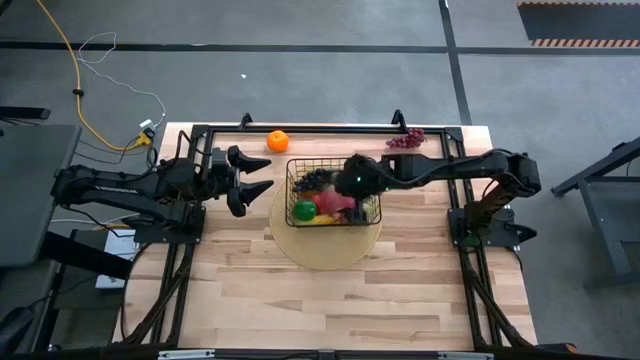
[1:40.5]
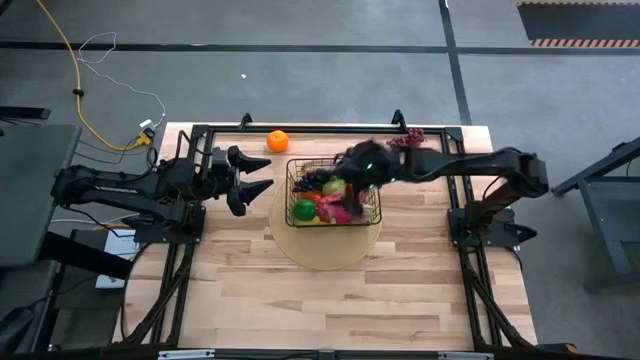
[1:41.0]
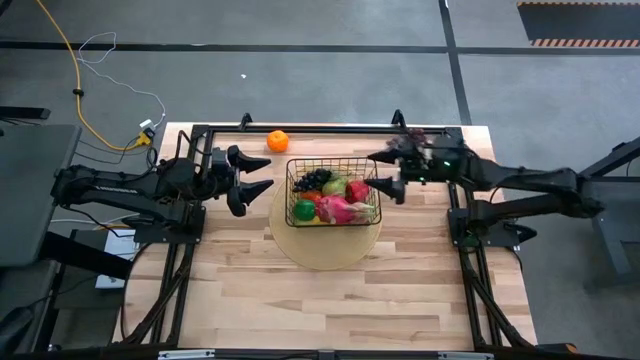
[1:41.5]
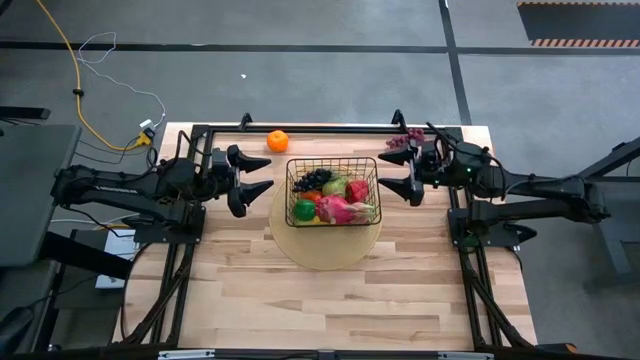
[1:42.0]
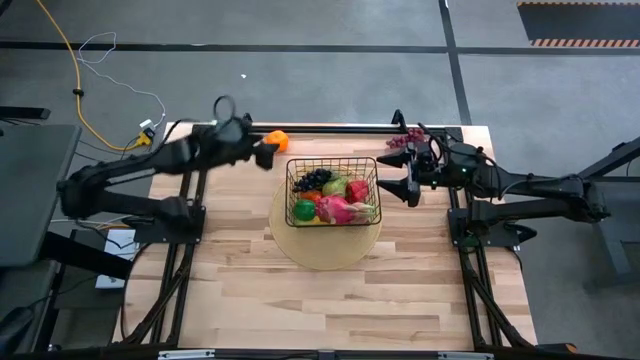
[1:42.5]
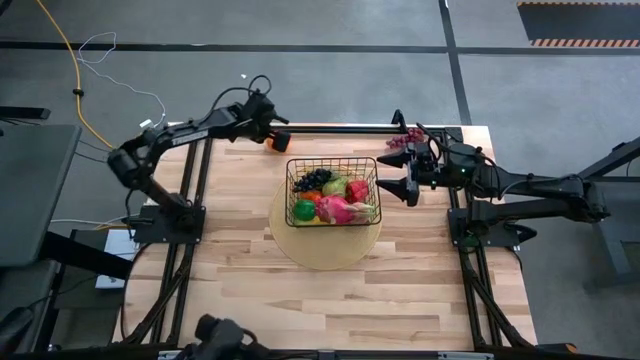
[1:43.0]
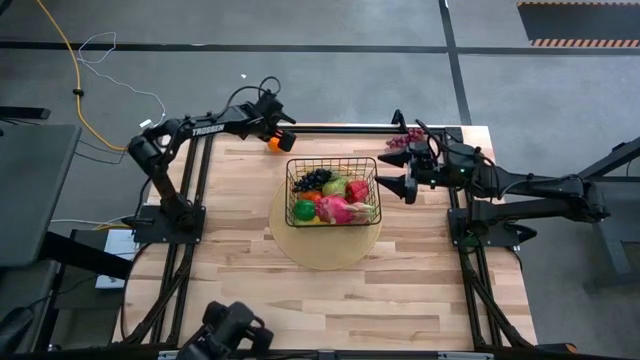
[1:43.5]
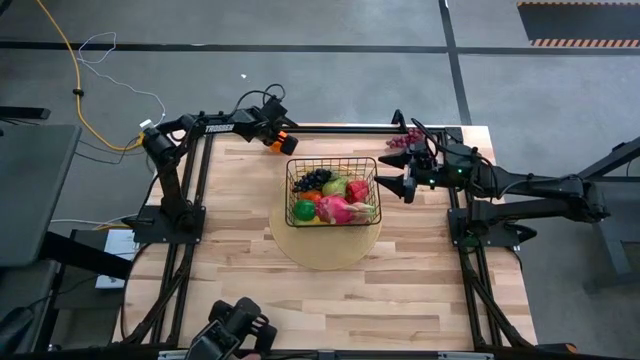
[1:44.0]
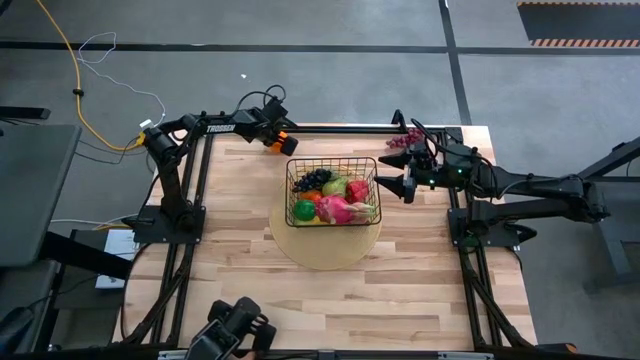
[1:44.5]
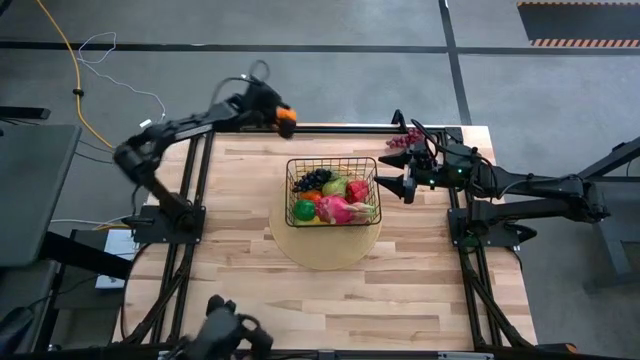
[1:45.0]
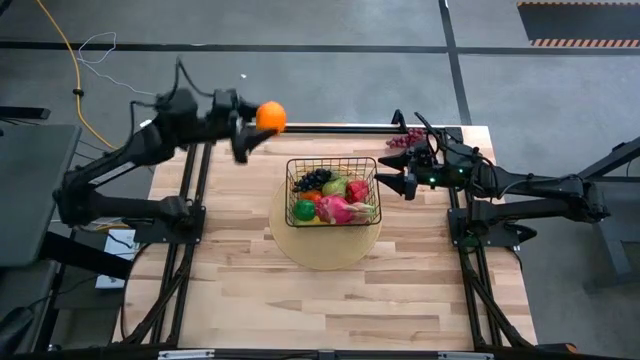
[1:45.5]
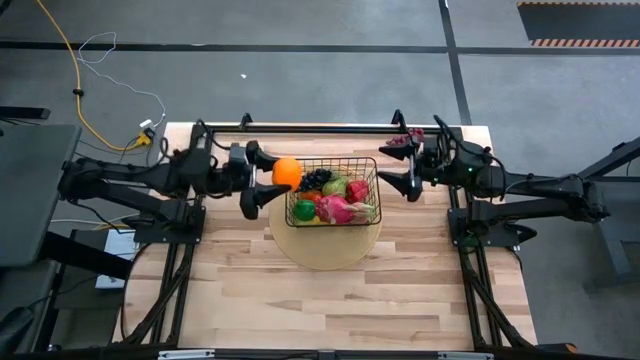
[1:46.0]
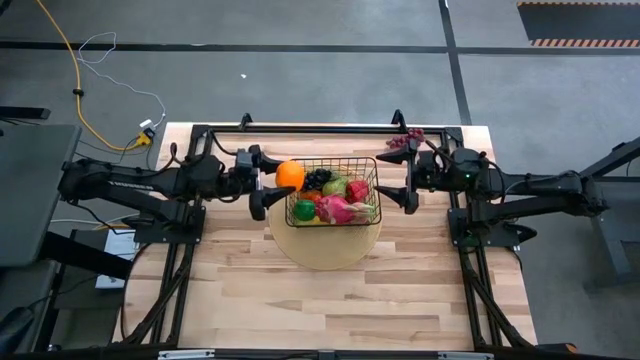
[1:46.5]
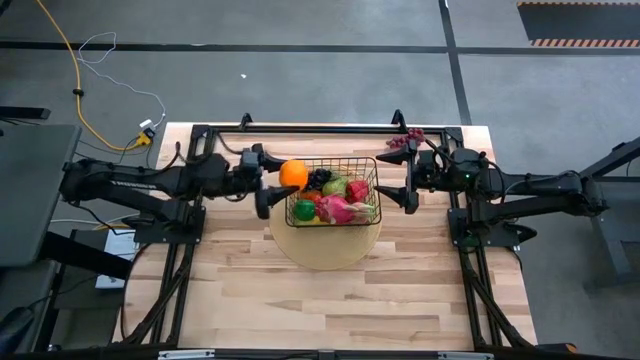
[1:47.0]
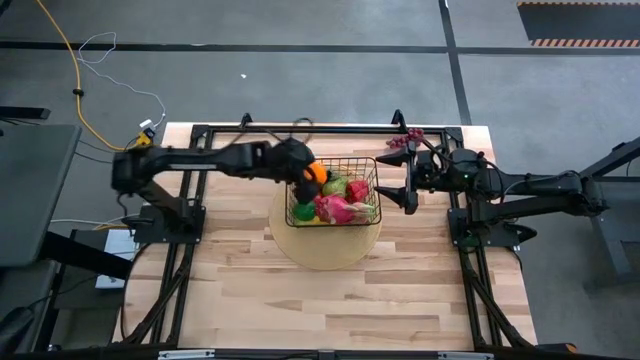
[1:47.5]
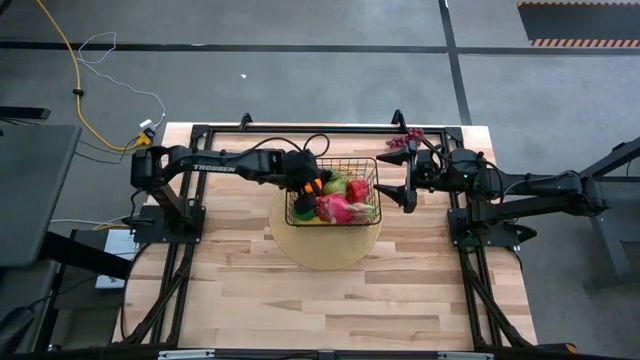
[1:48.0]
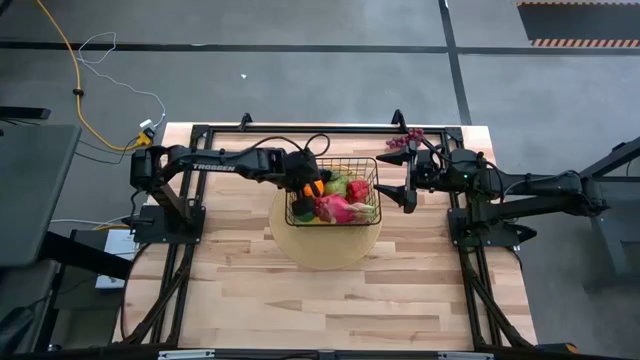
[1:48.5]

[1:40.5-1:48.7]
Task: Build produce basket
Put the orange into the black basket

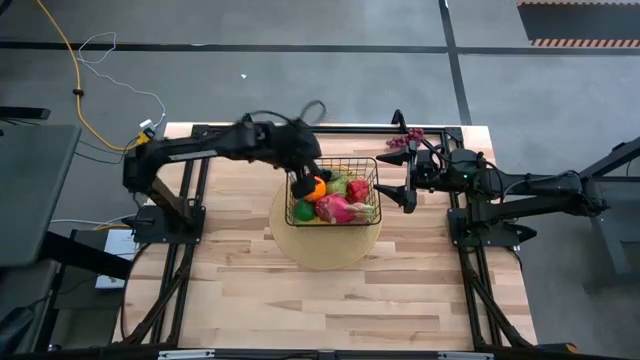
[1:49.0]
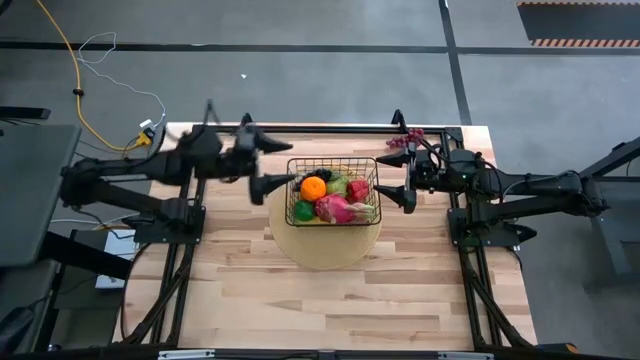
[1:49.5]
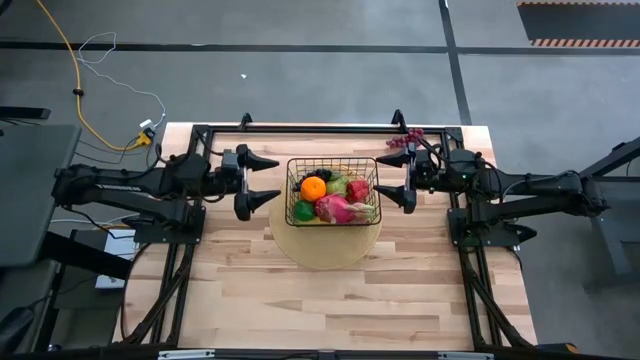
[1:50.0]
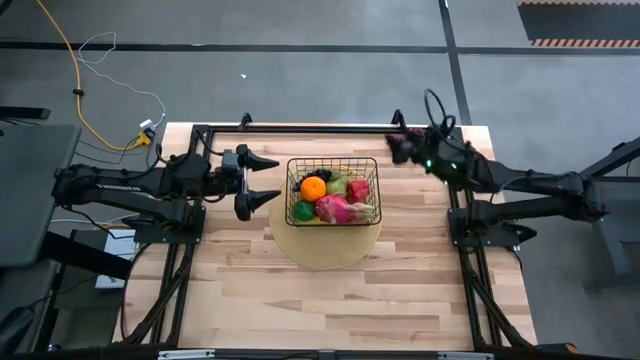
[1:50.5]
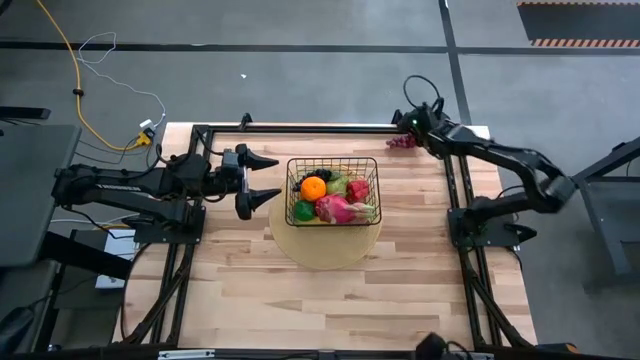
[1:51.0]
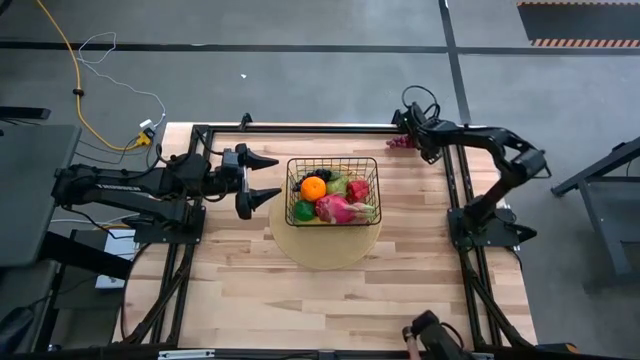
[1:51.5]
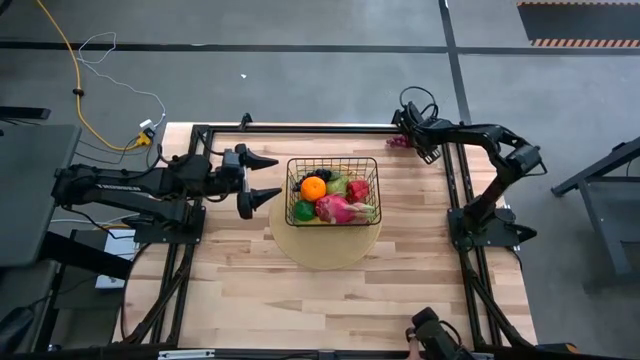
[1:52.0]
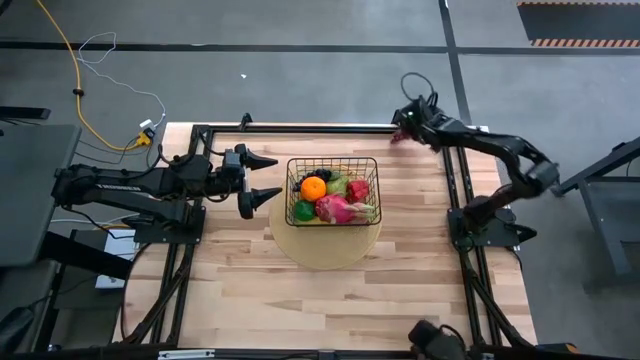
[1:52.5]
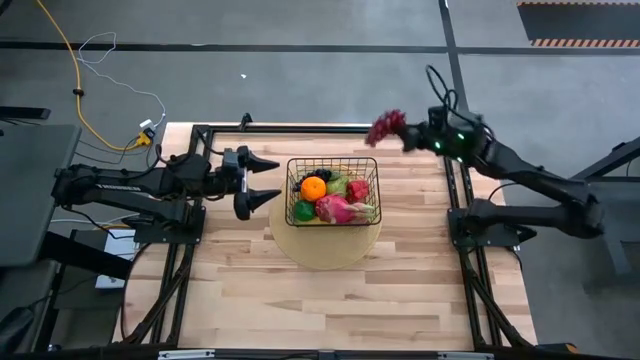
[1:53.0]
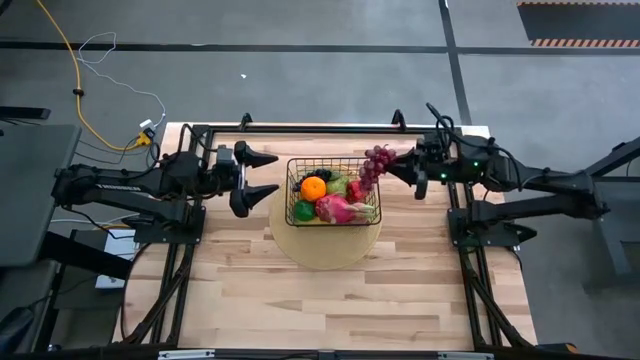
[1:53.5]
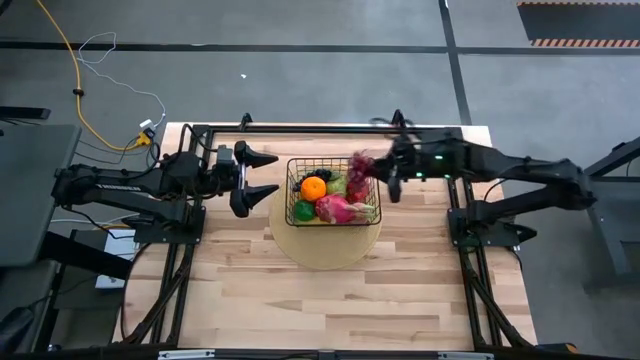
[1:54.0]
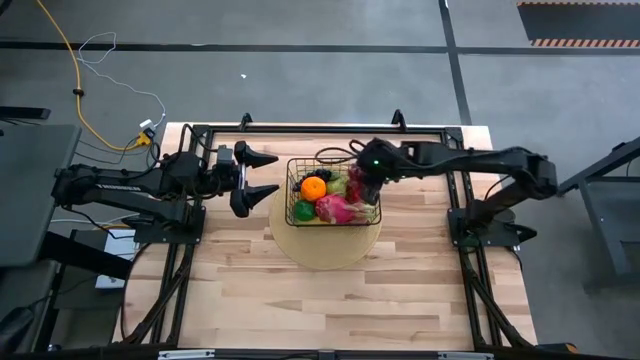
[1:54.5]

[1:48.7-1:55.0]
Put the red grapes into the wire basket

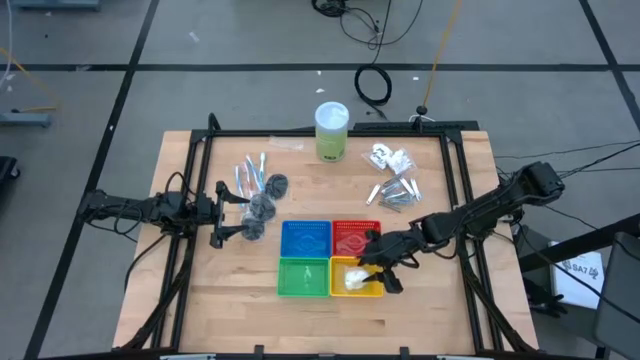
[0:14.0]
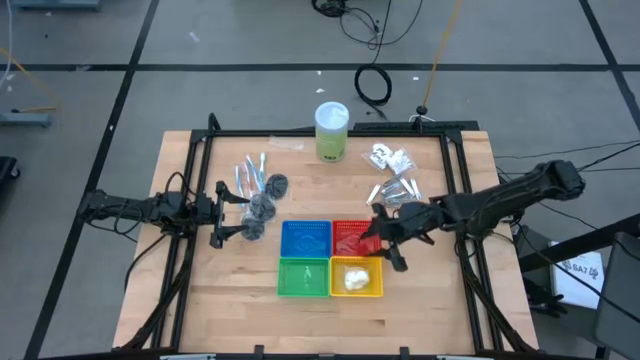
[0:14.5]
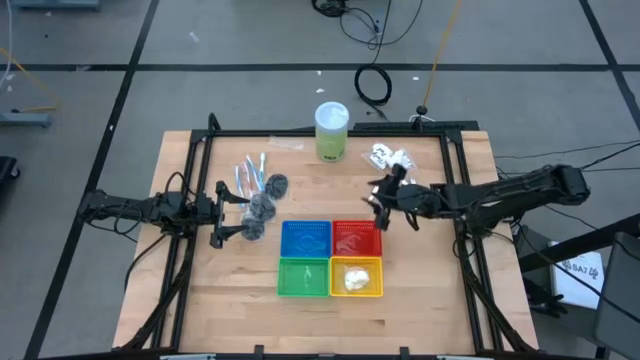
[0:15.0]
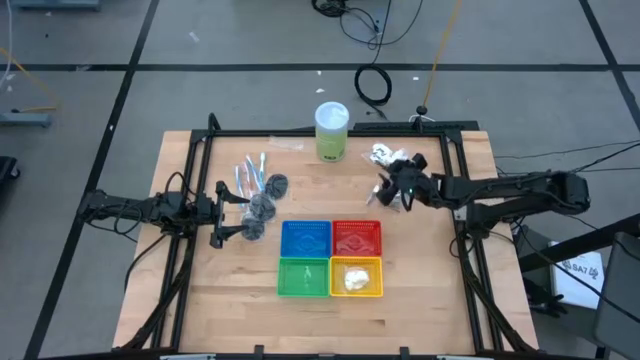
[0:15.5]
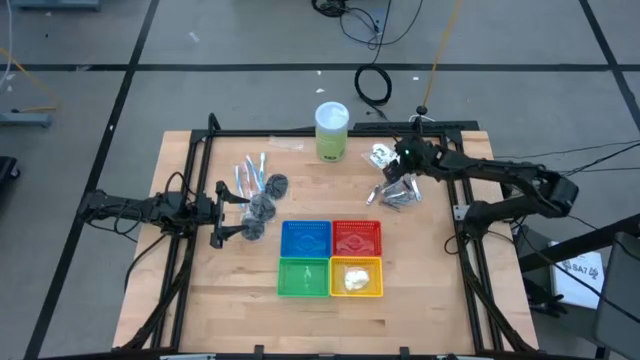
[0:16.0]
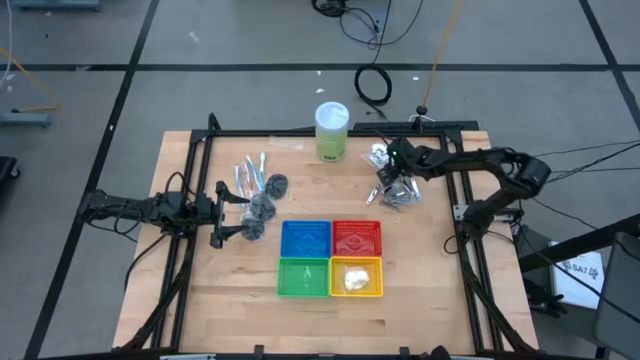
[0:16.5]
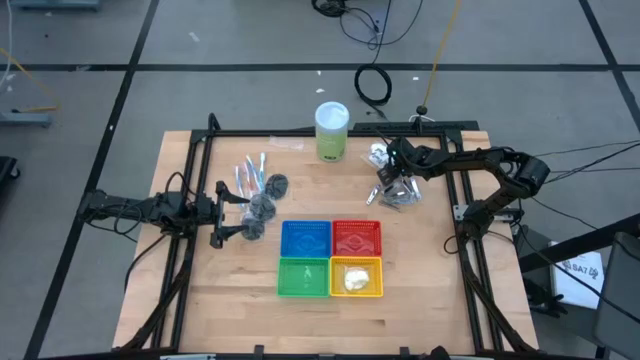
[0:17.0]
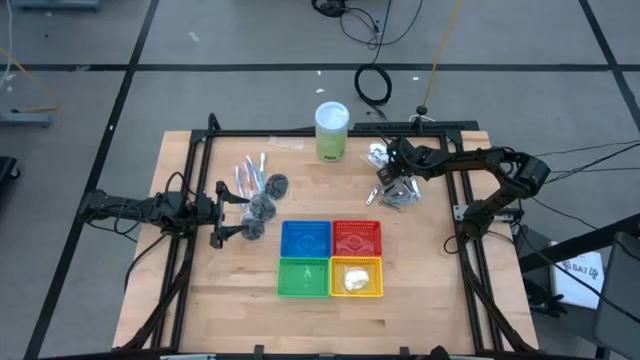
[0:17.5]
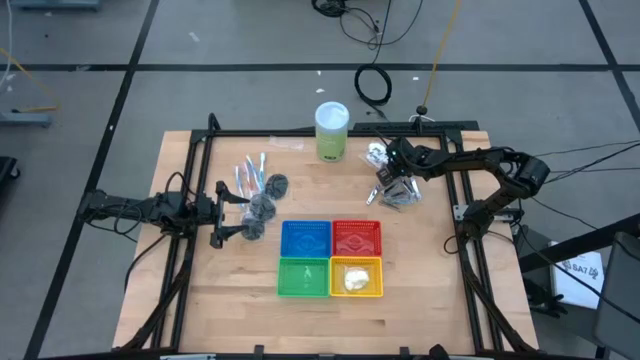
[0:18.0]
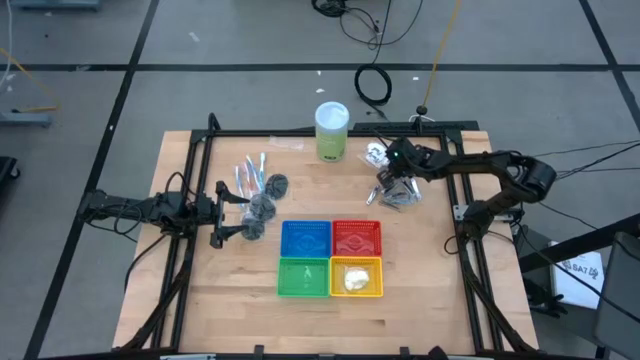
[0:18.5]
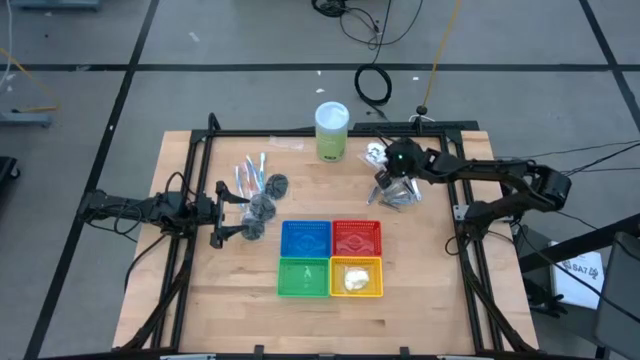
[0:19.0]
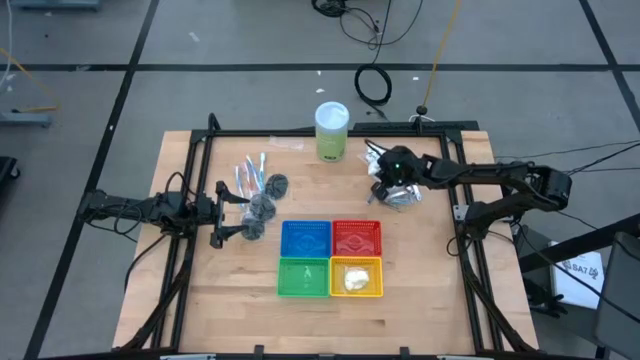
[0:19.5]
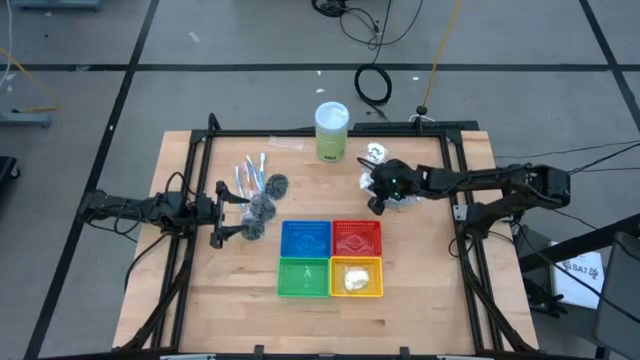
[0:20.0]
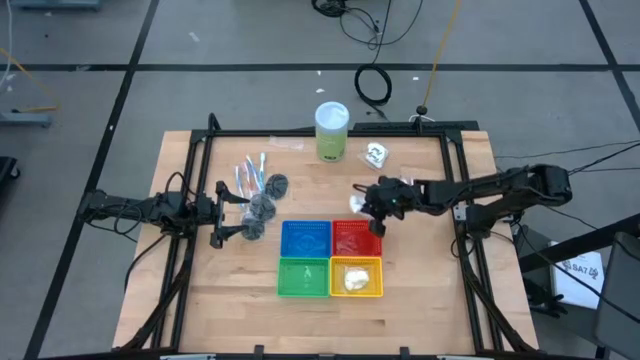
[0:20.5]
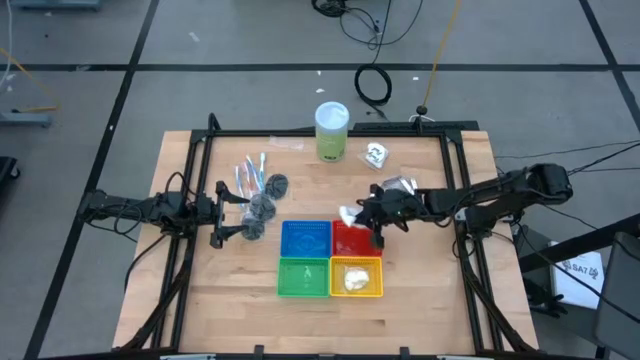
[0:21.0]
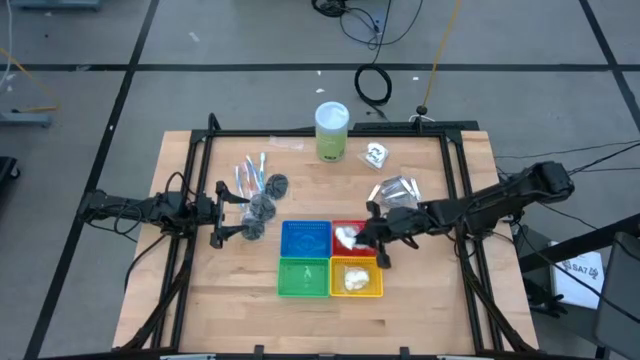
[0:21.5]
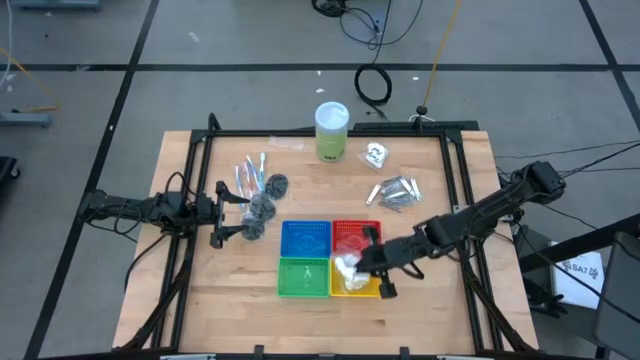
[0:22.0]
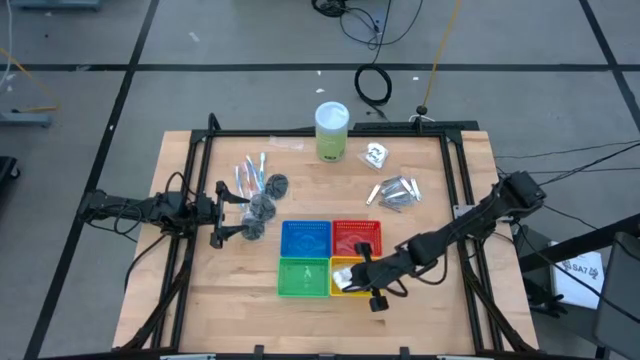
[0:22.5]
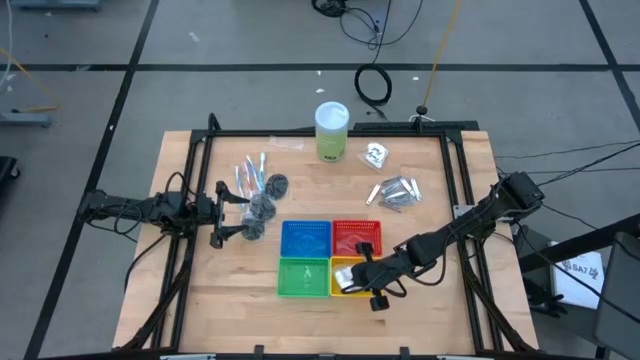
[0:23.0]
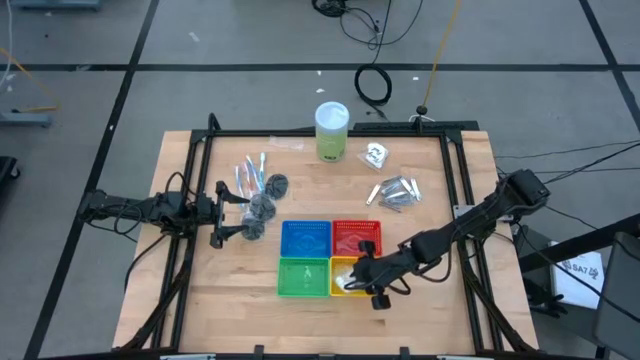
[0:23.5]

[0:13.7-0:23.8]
Task: Pick & Place Travel size toiletries
Put the right white cotton pack into the yellow basket
